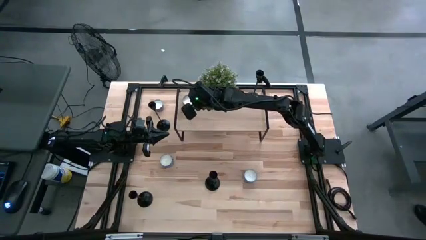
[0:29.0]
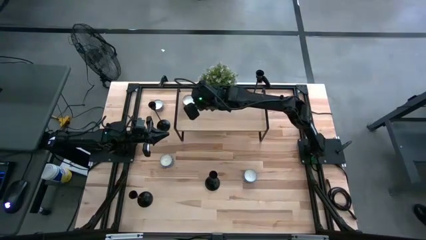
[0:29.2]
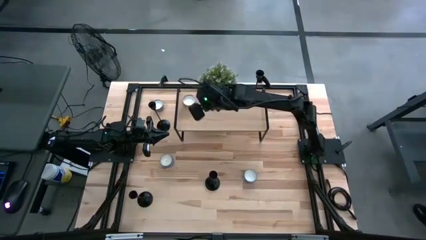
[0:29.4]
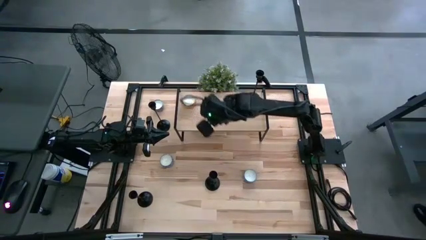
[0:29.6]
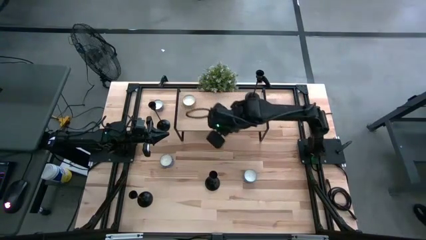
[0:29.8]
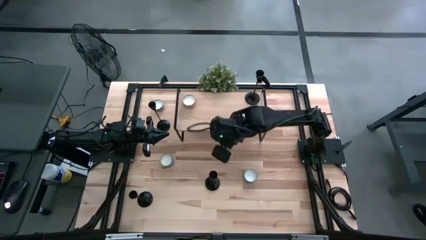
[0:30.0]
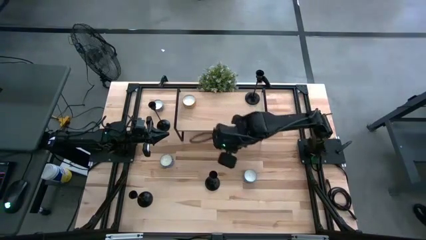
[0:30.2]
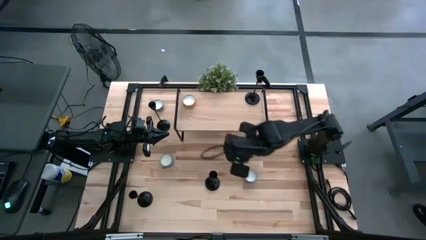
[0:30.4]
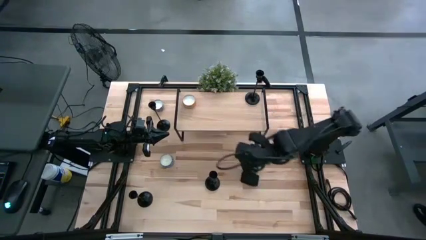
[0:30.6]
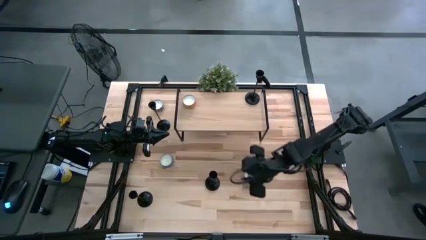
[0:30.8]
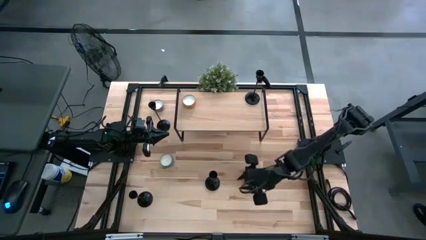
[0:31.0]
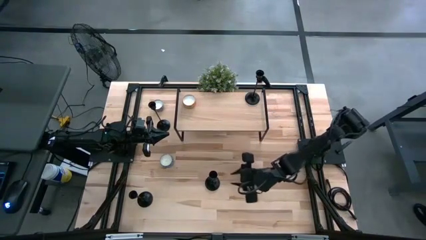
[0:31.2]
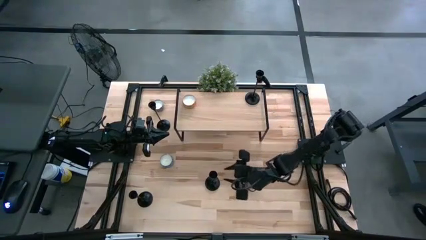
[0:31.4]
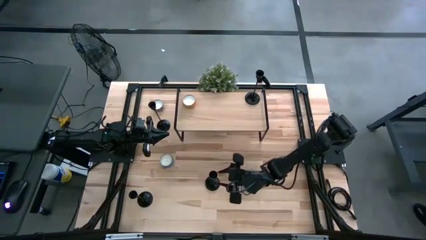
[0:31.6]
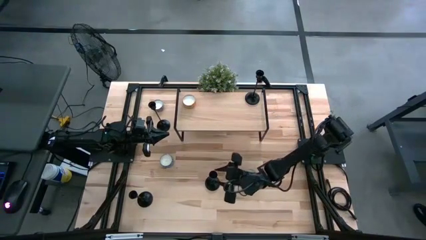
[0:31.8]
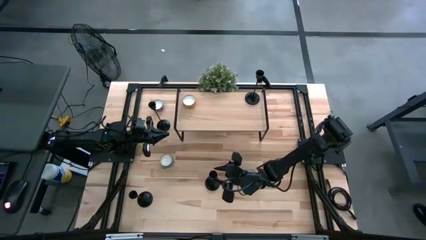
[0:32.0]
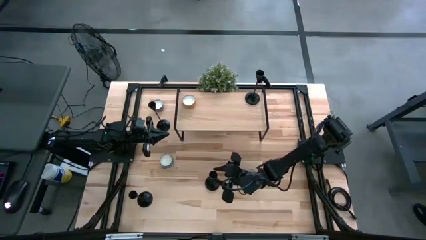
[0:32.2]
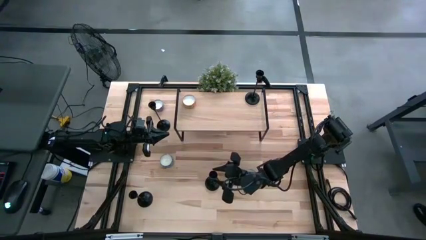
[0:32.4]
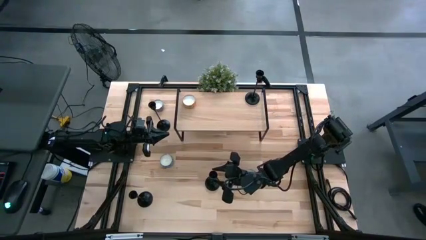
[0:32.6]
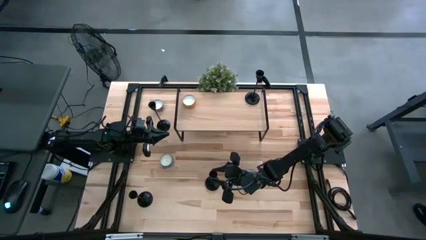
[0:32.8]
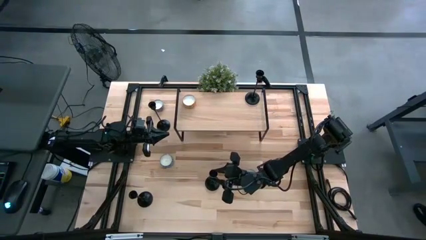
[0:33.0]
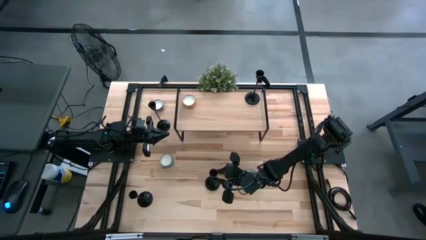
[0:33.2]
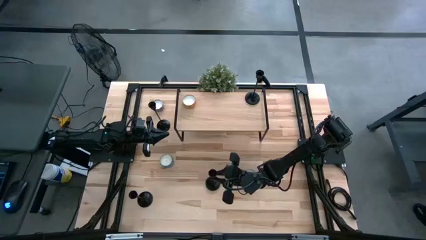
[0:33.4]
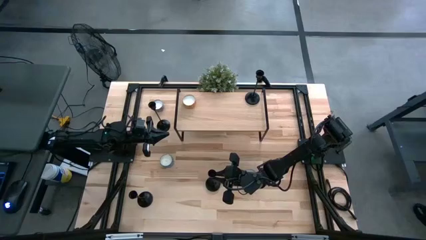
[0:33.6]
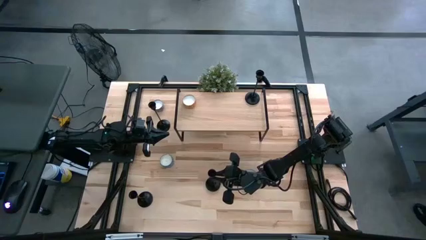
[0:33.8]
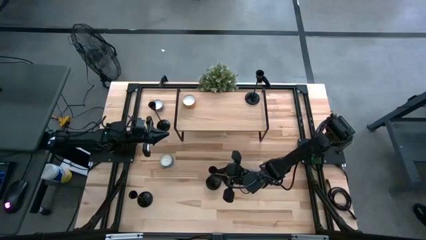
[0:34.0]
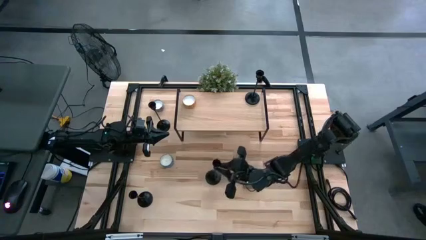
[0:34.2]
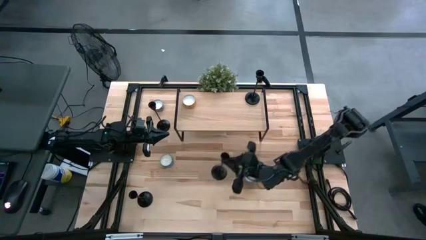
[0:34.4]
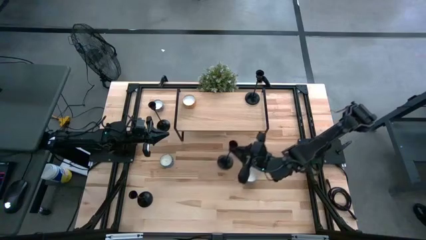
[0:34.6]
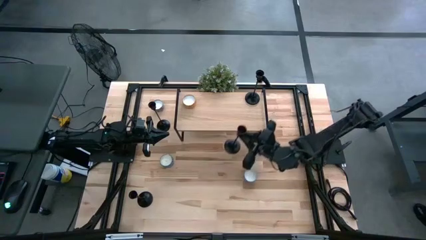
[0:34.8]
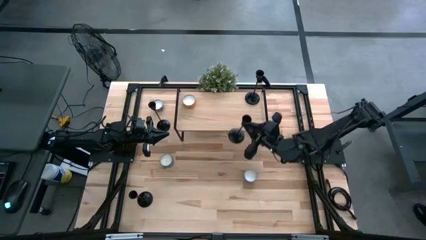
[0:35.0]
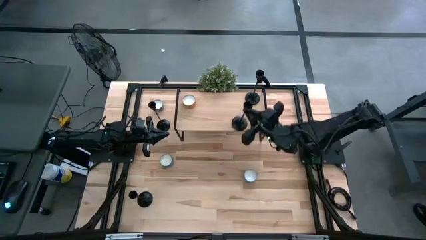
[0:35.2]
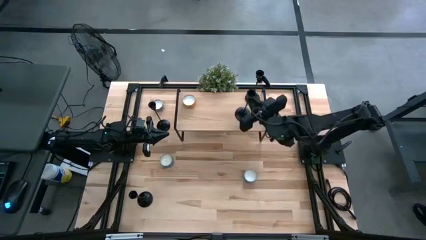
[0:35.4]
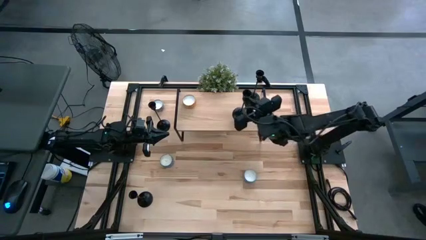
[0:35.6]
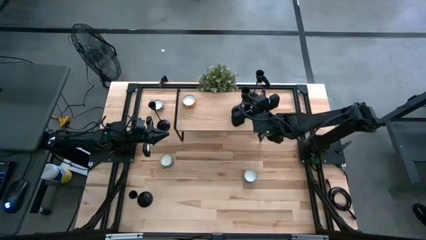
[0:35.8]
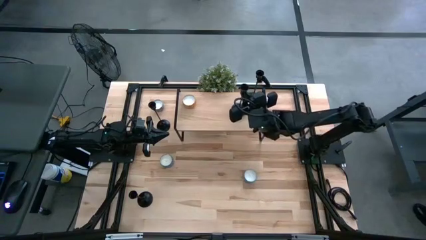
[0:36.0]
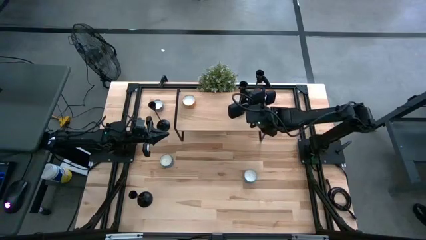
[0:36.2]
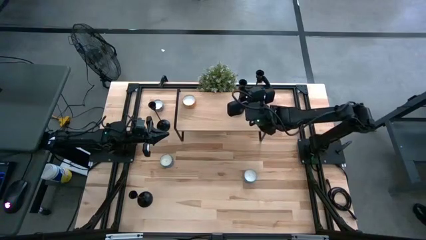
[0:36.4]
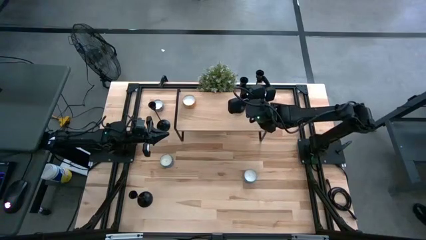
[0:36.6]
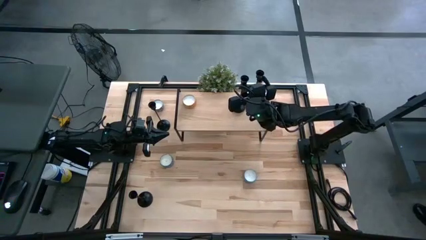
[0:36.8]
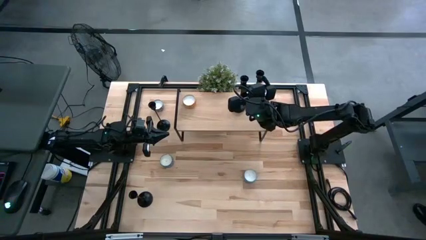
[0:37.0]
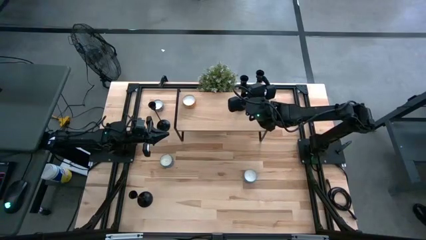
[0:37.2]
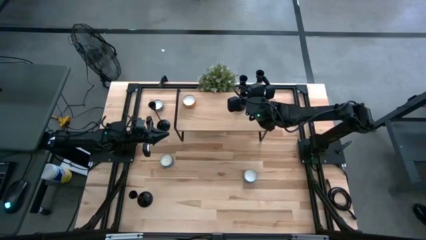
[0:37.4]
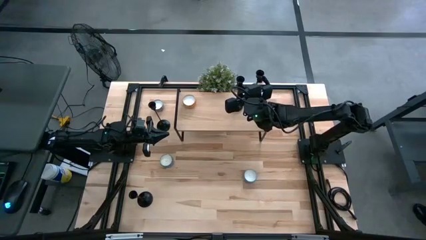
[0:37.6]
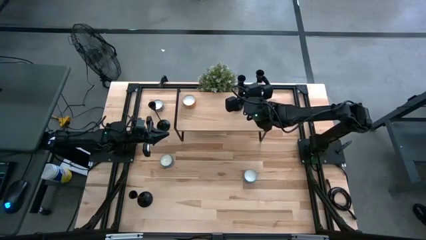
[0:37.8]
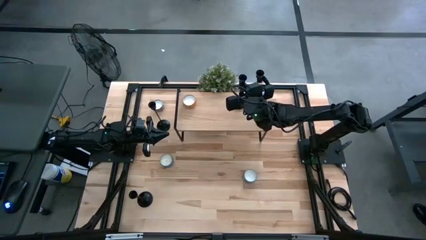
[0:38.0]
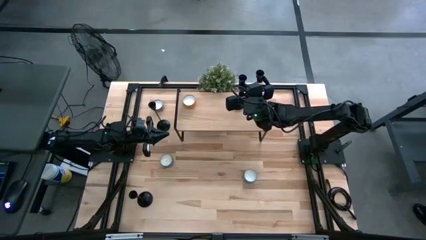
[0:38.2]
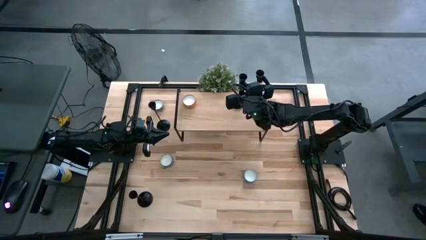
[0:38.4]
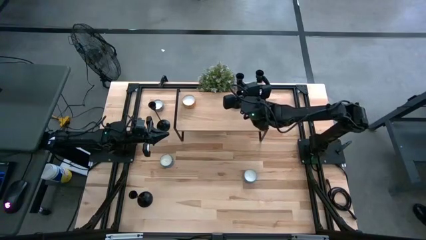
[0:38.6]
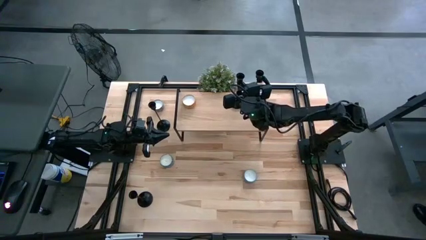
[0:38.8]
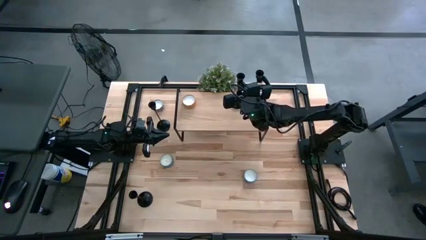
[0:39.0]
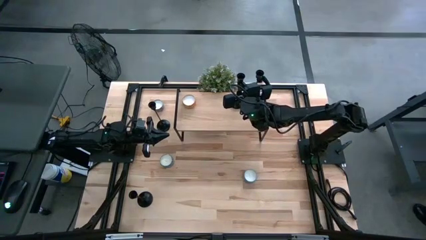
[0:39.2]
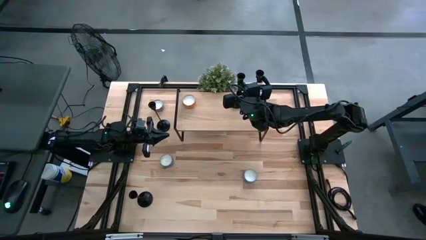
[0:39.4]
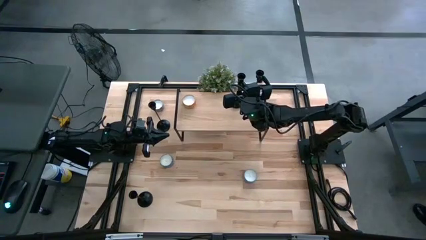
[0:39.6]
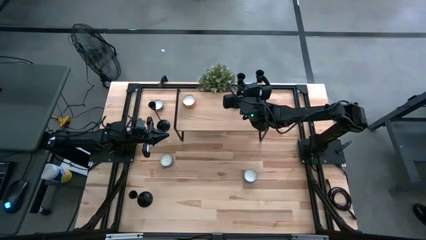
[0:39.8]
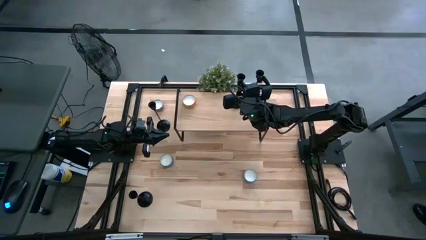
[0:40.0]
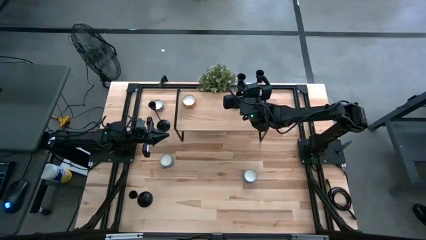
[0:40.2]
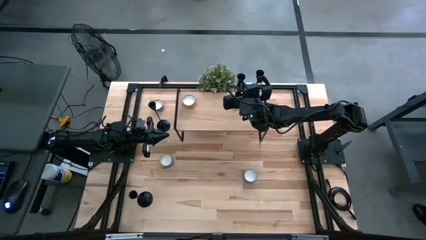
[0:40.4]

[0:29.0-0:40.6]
Task: Pick & Place candle stick holders
Put the black candle holder on the shelf aligned with the black candle holder

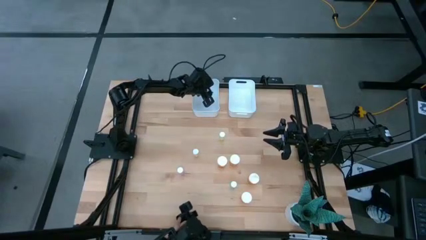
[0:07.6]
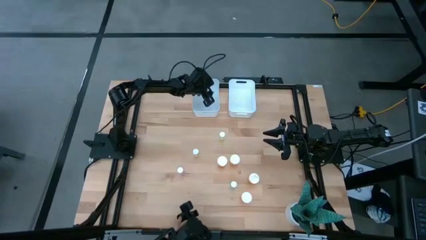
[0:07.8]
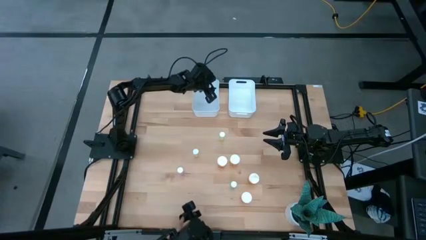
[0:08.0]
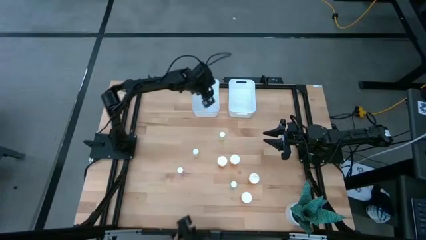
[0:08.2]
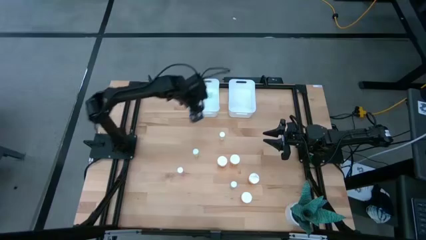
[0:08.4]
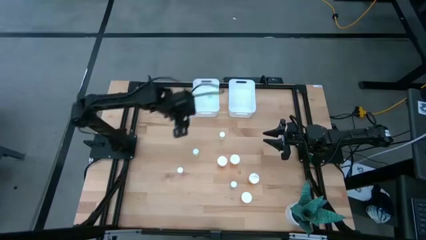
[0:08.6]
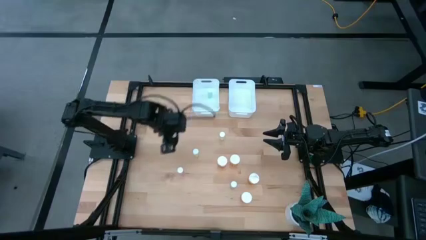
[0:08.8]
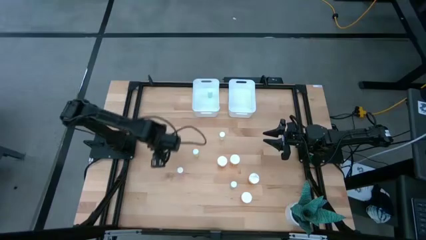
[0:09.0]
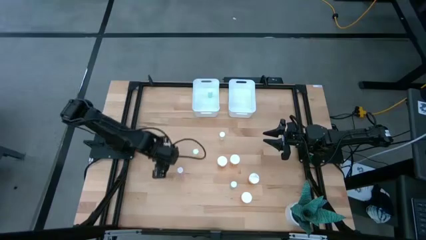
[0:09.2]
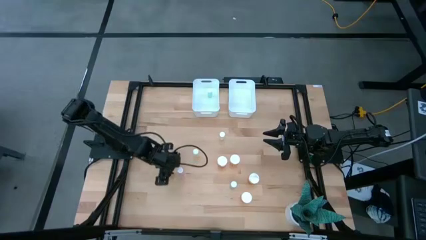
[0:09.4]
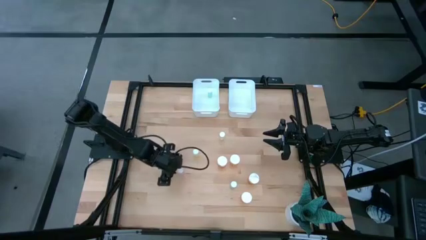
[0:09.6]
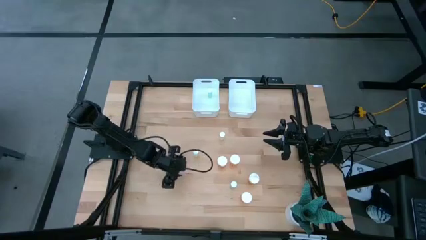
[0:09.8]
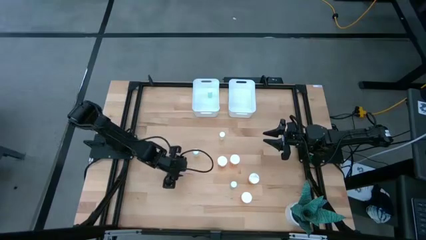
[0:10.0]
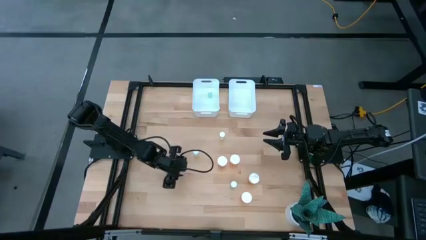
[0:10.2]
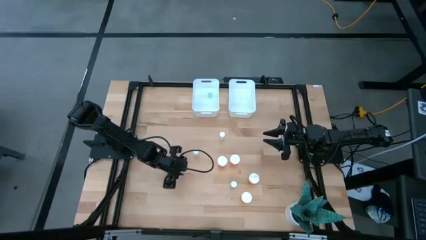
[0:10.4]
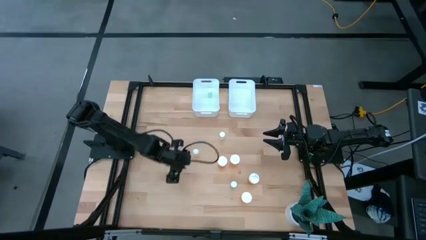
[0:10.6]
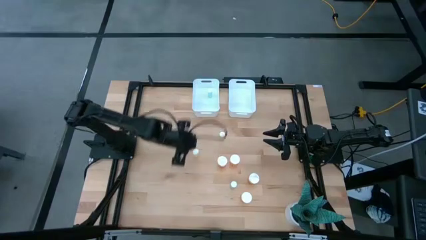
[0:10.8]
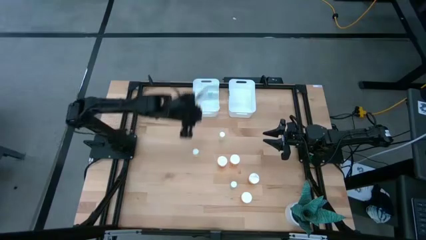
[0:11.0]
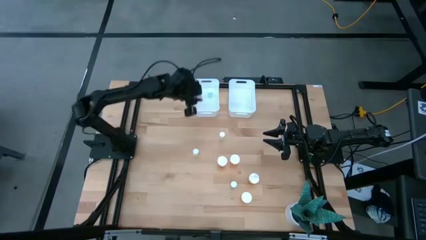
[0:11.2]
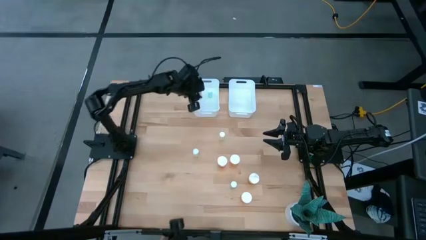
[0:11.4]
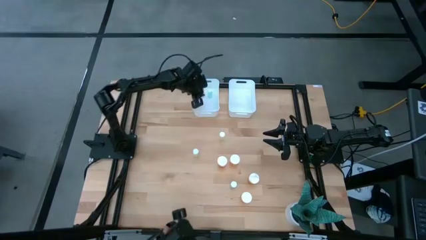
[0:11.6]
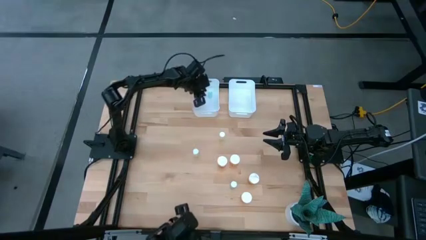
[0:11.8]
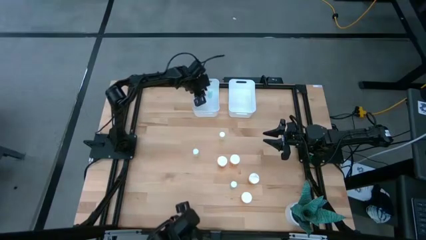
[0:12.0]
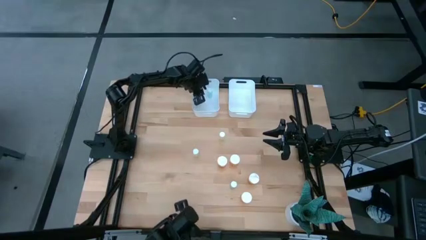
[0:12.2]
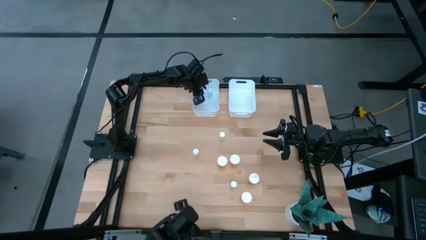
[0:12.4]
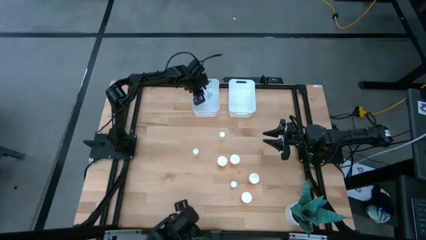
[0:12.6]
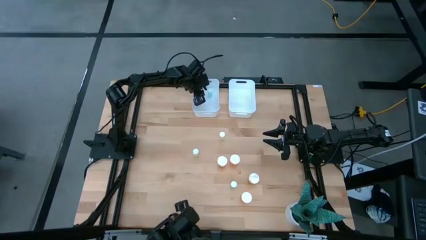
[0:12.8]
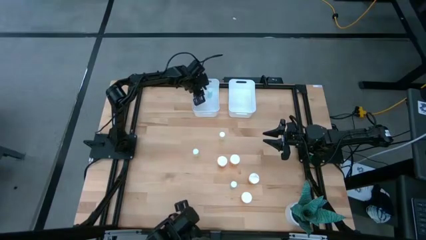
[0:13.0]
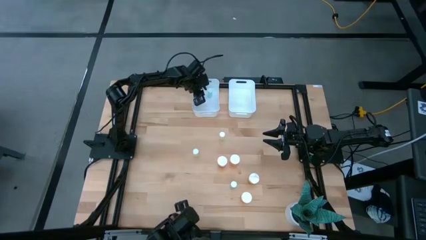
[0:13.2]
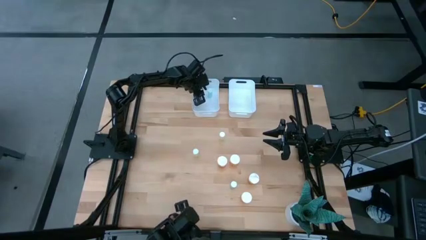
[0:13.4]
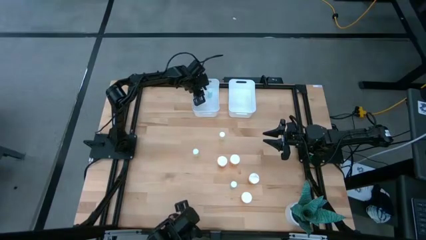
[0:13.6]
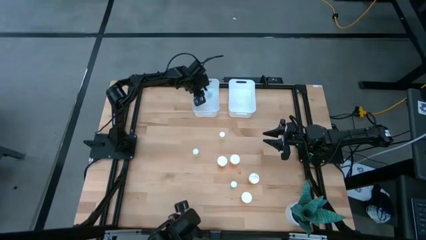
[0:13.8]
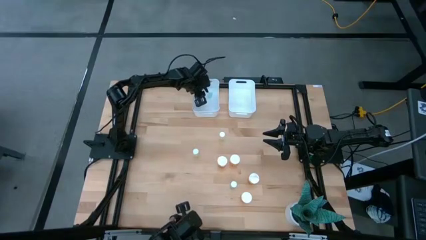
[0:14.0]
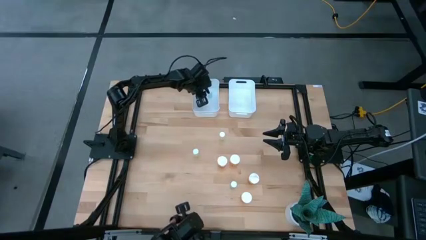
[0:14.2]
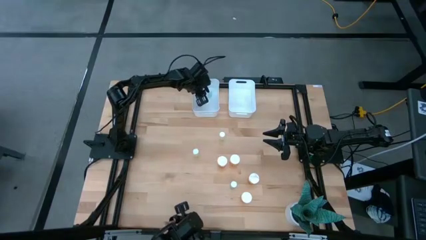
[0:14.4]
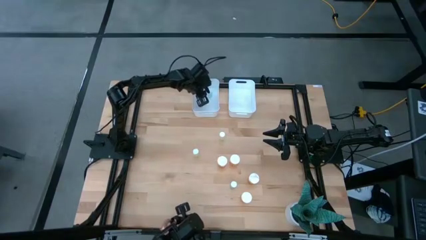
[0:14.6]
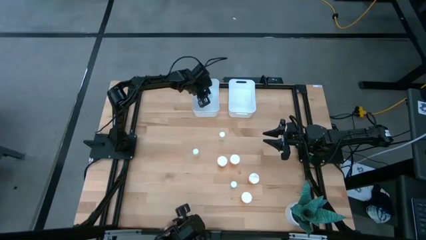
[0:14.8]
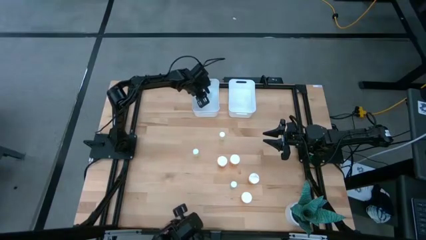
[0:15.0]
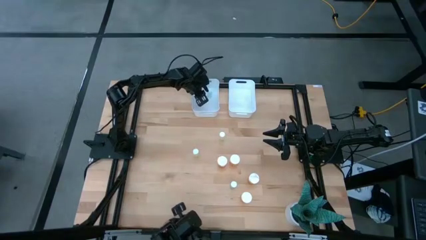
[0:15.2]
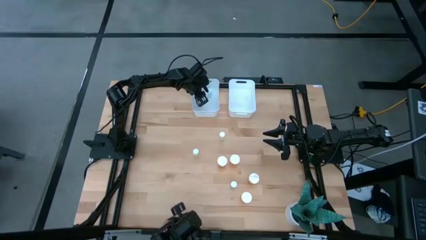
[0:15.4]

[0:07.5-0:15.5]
Task: Pick and place medicine bottles into bin by pill shape (circle, oval)
Put the pink tablet bottle into the white left bin
